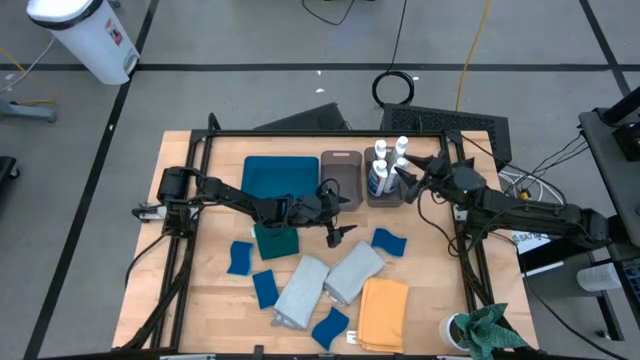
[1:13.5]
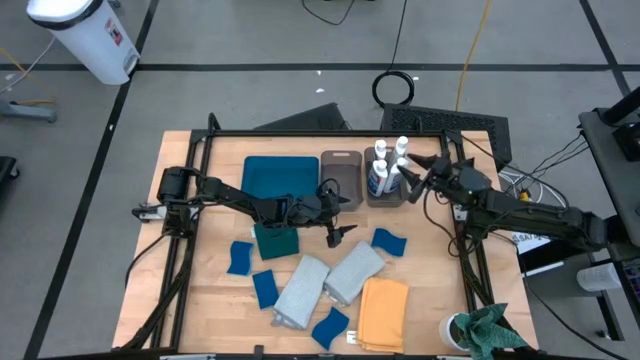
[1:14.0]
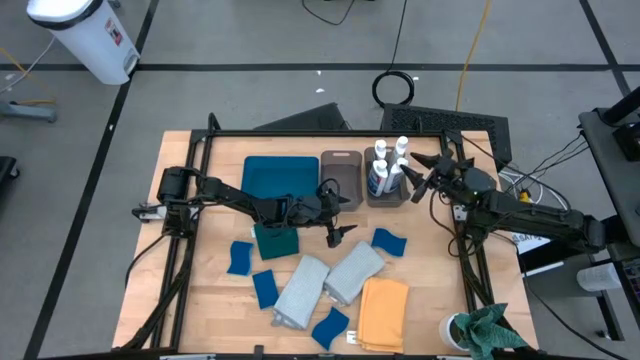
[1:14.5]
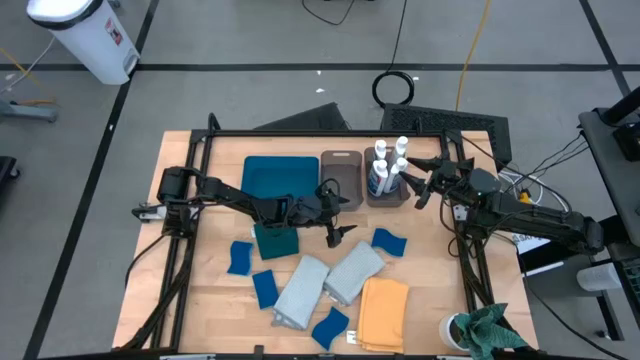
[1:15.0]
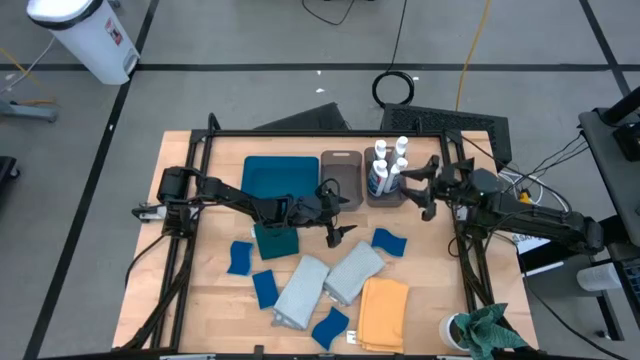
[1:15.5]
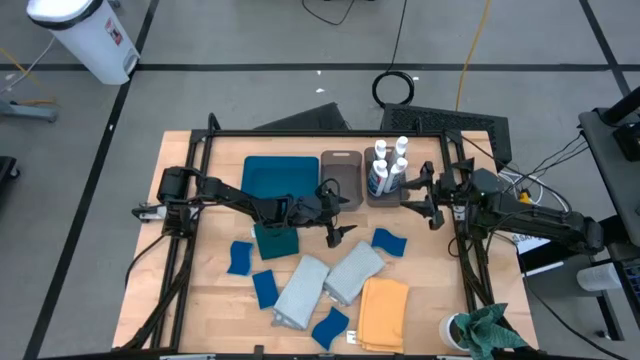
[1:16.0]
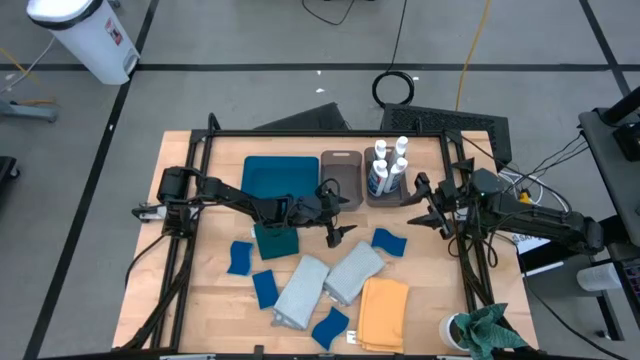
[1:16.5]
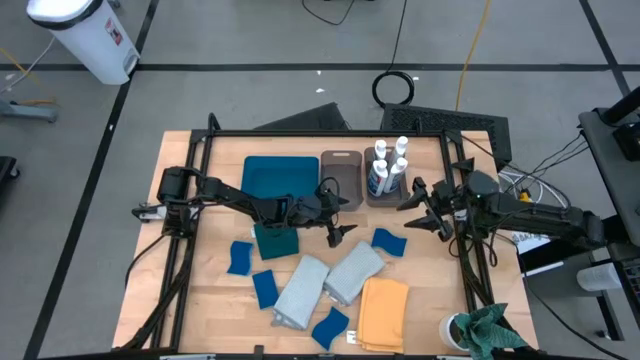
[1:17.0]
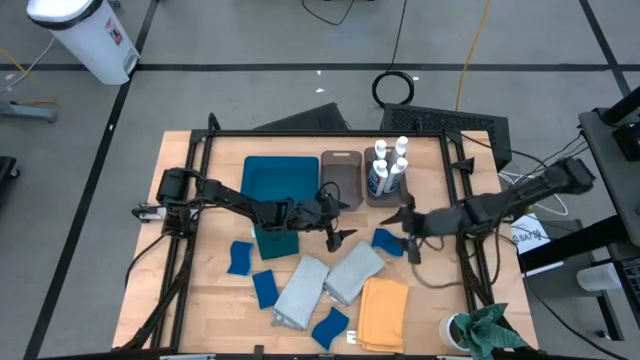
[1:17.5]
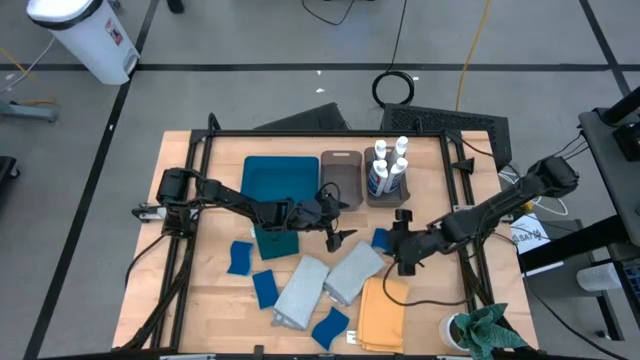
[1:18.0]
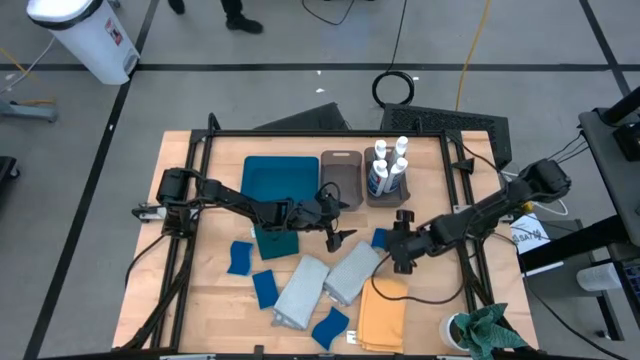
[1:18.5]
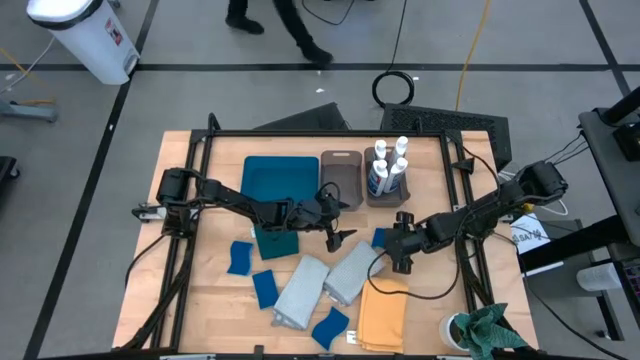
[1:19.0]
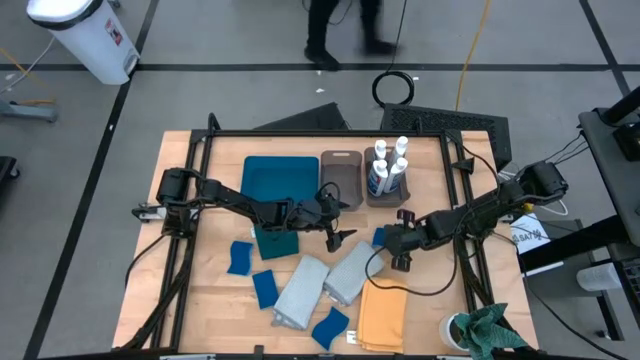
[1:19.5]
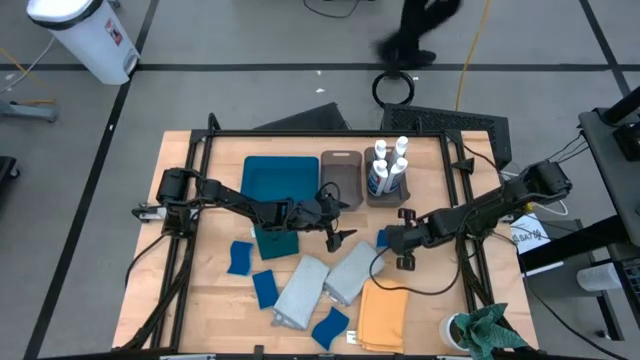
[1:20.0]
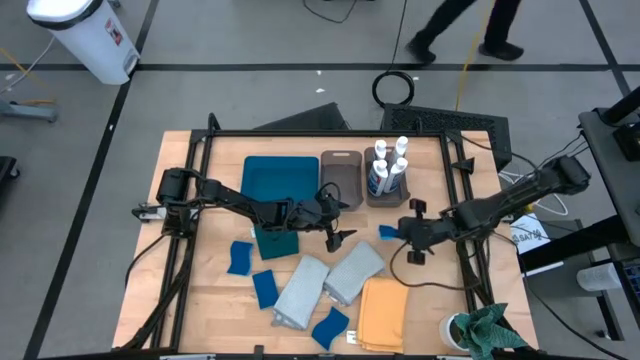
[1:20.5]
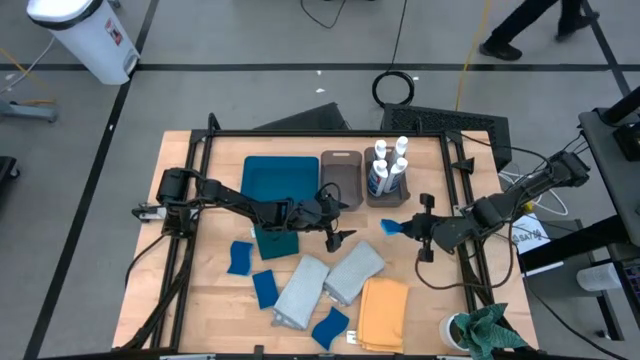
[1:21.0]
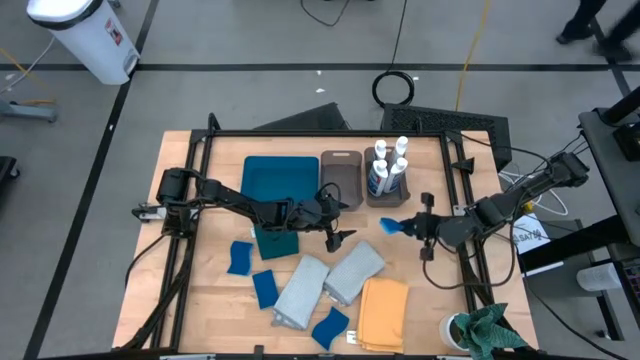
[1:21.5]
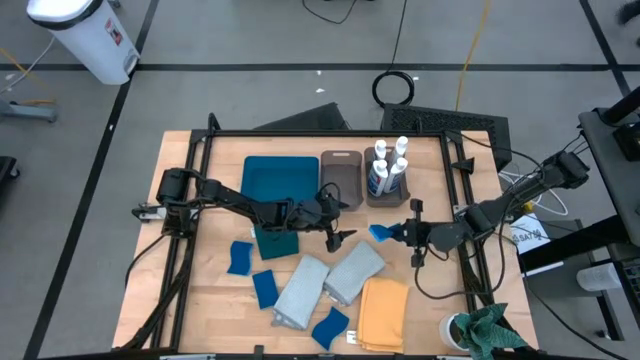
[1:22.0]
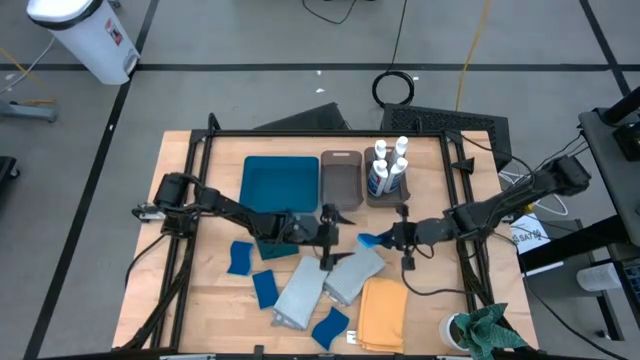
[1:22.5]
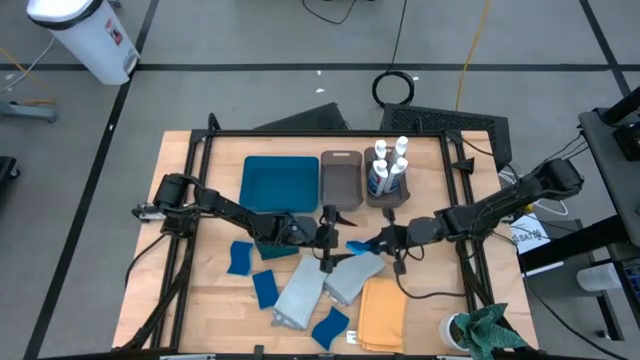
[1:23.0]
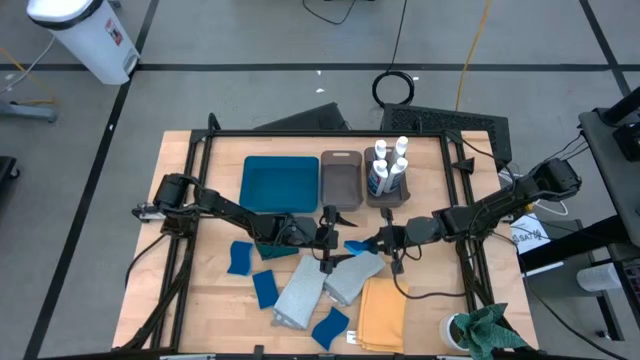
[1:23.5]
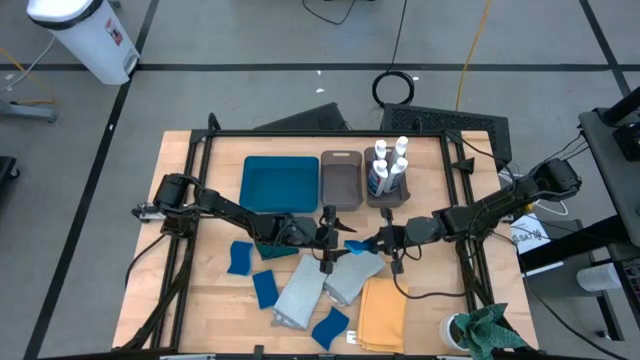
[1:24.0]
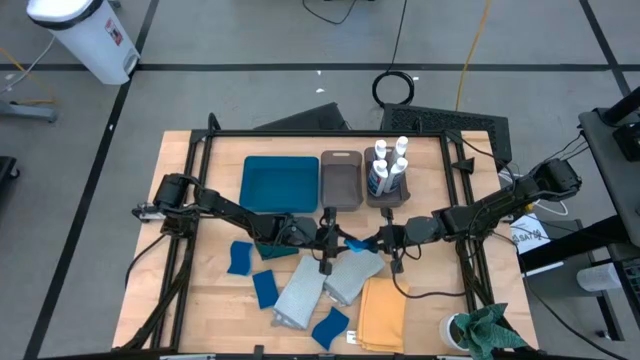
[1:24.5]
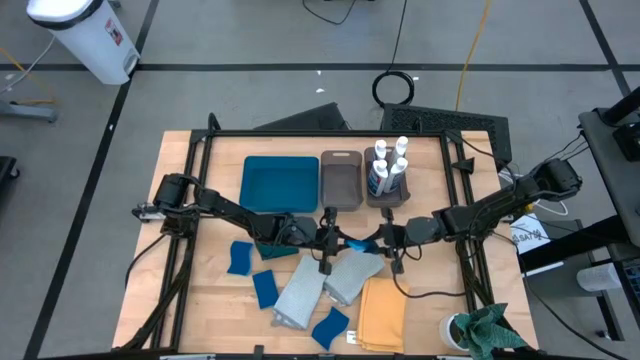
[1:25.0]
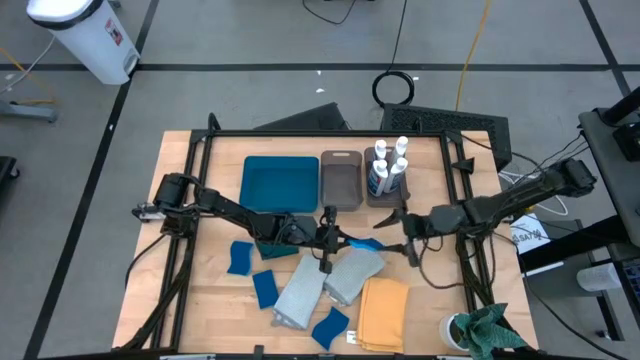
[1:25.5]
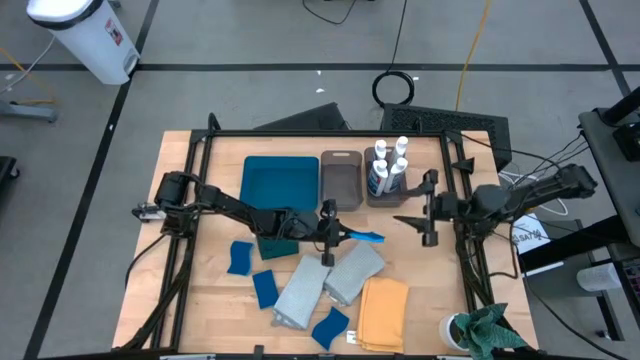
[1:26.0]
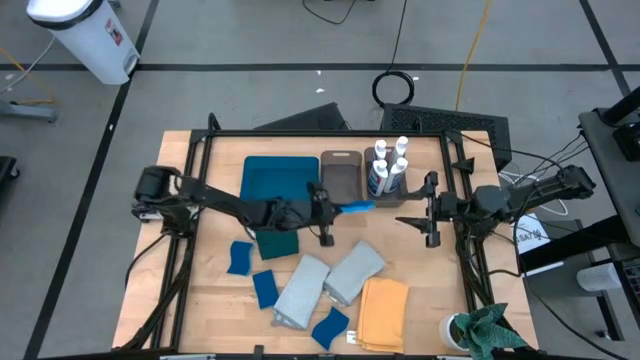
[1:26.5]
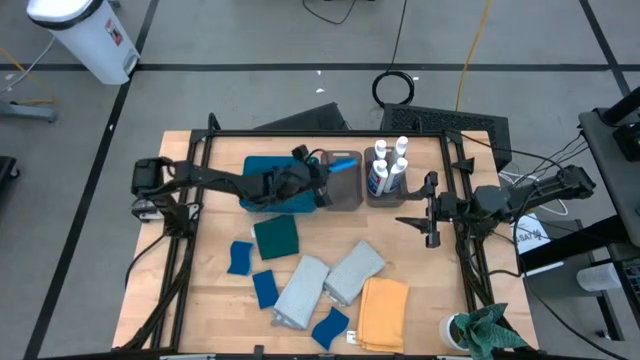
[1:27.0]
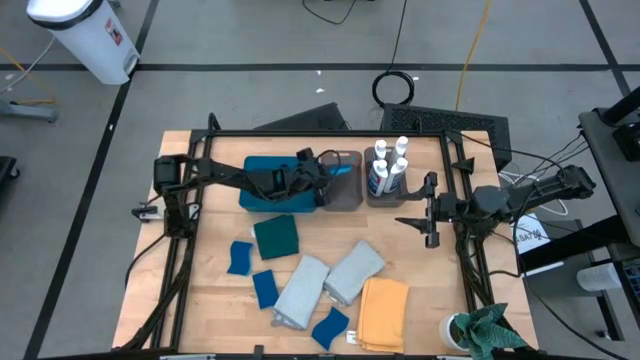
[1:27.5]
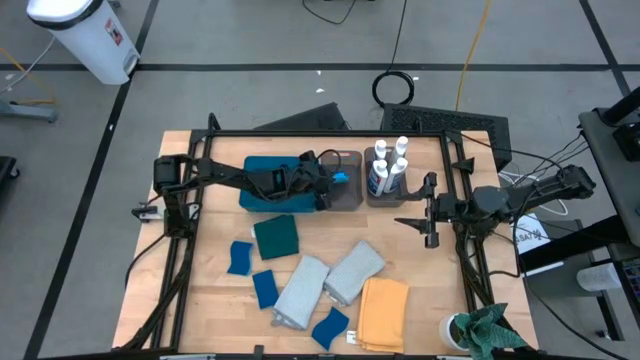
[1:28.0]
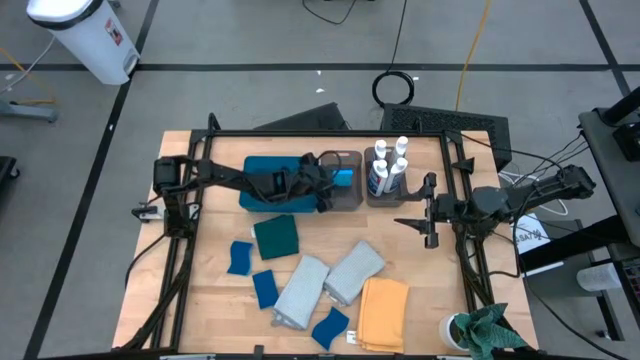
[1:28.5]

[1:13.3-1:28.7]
Task: Pick & Place Kitchen Items
Put the blue sponge into the left black bin

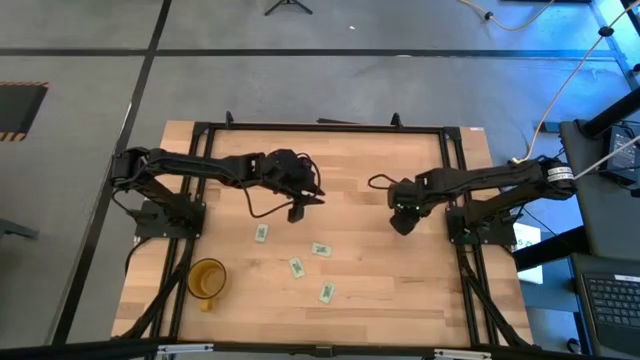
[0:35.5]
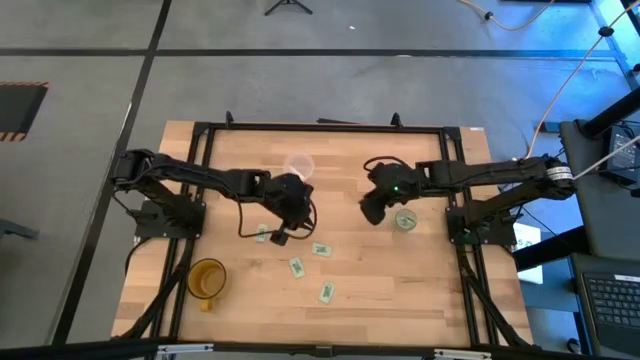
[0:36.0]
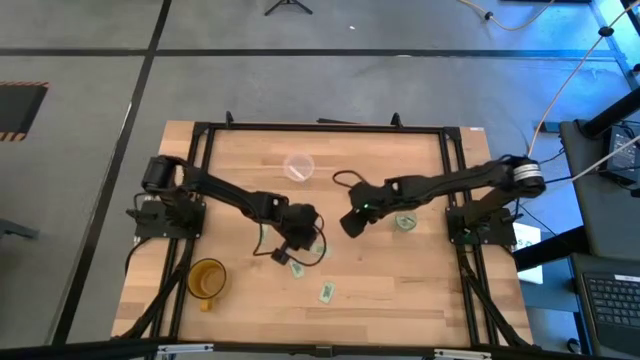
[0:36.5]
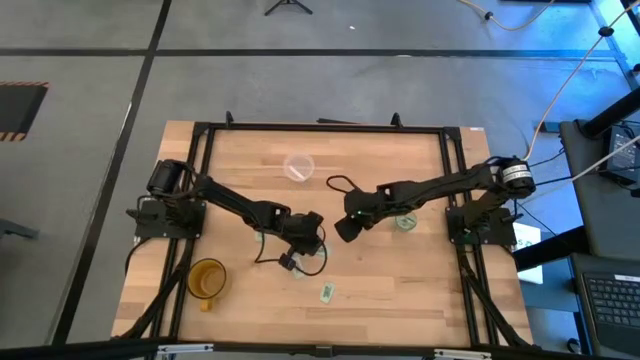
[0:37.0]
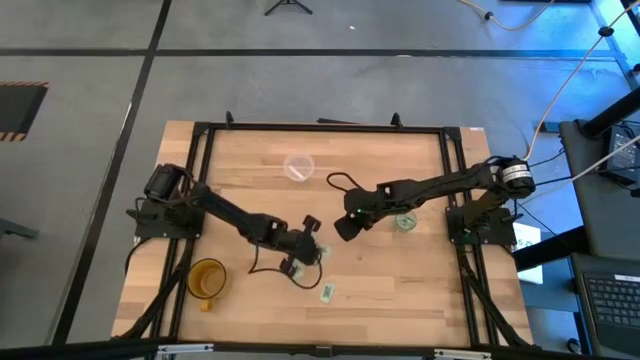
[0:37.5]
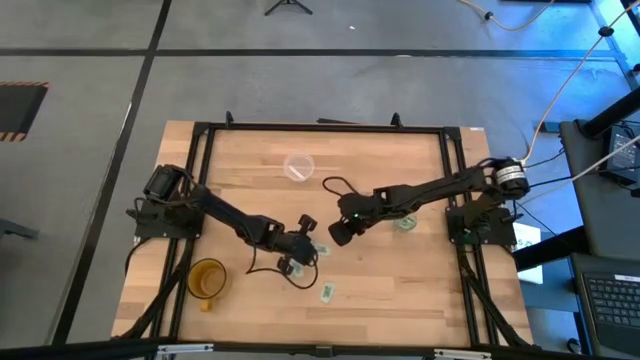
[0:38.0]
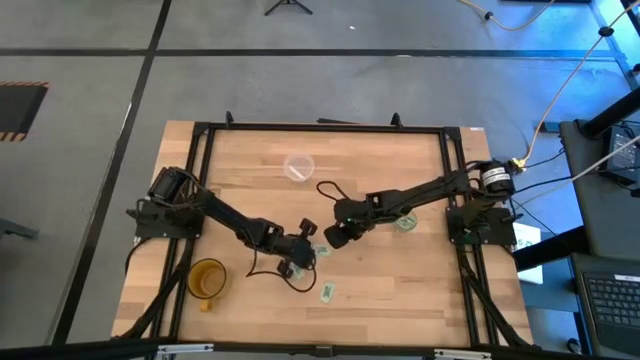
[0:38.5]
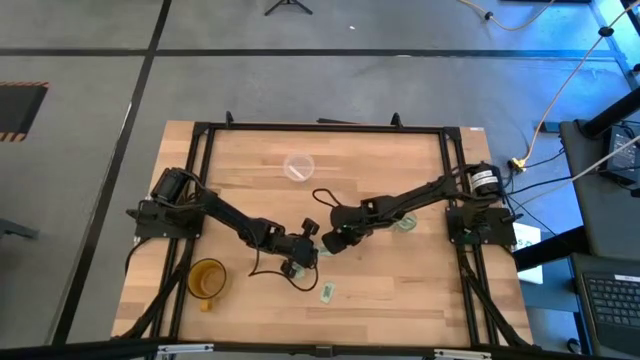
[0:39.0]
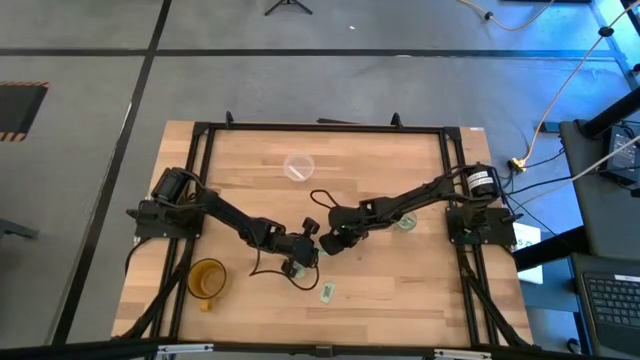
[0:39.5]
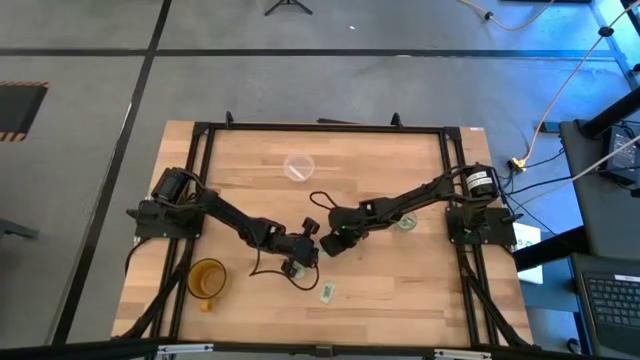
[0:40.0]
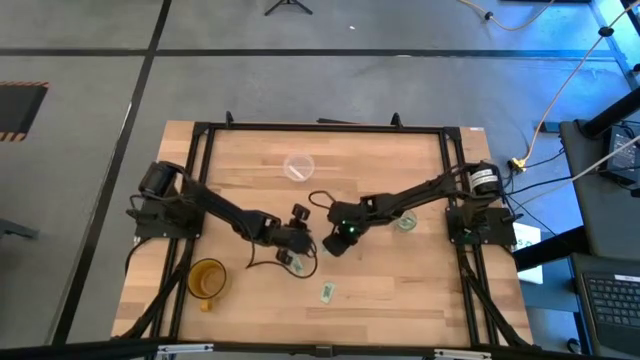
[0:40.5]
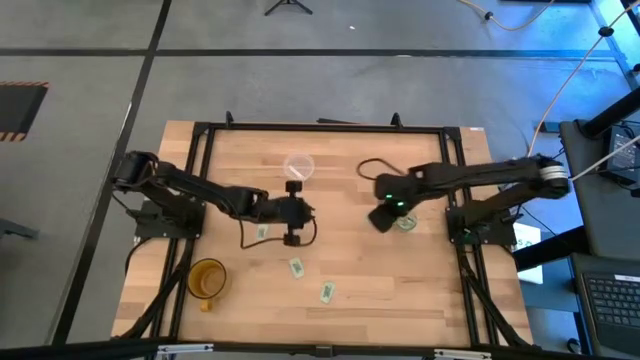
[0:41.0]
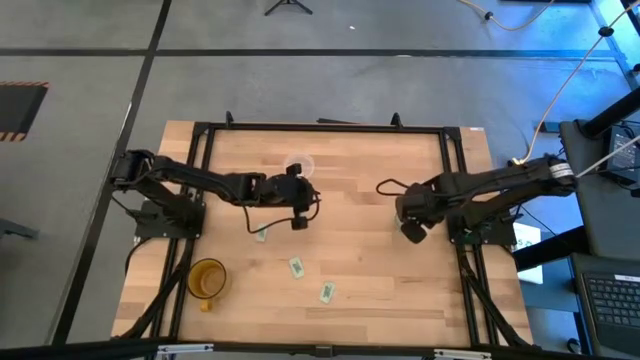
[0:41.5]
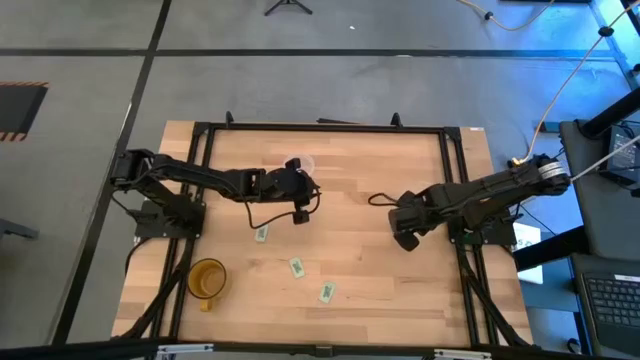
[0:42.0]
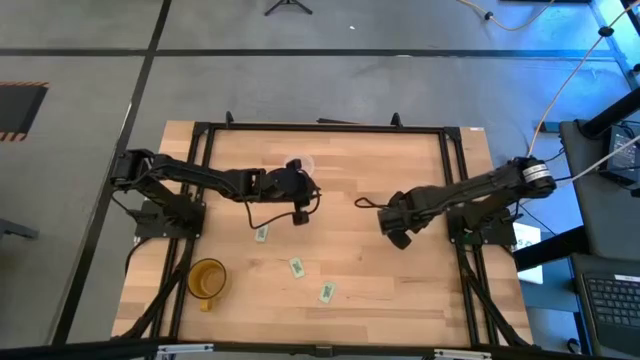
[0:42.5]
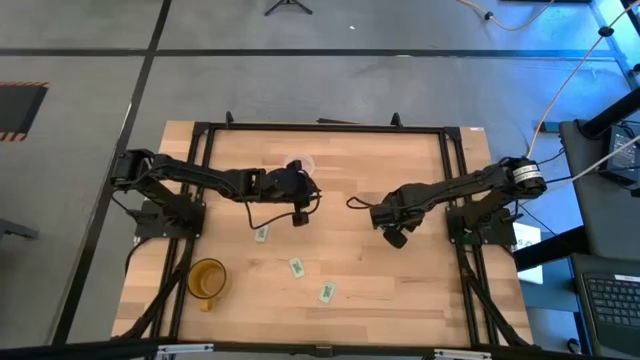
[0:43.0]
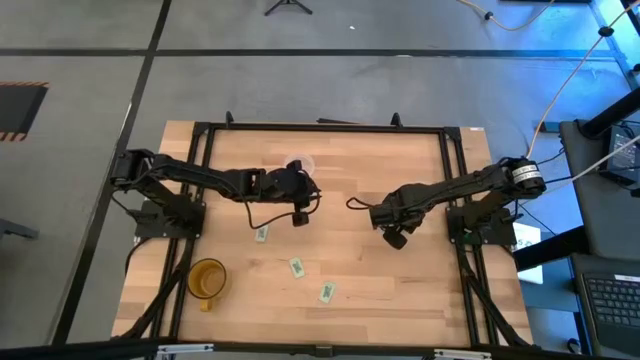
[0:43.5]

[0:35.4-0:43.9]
Task: Pick and place Stevia / Truvia into bins
Put the stevia packet into the transparent container
